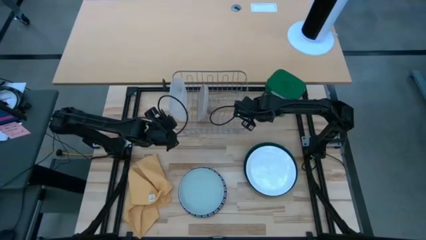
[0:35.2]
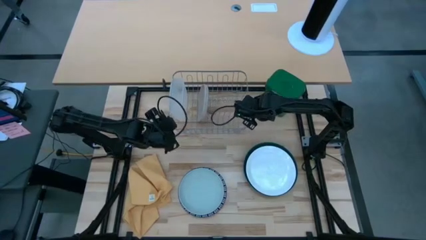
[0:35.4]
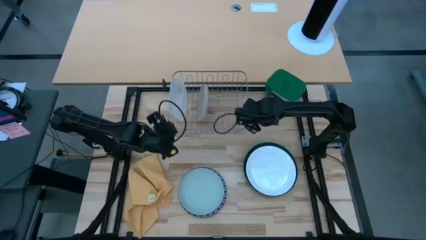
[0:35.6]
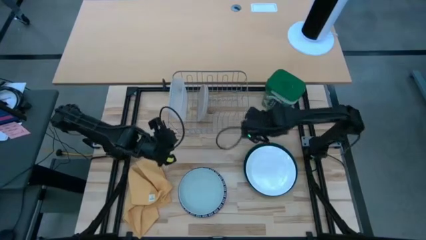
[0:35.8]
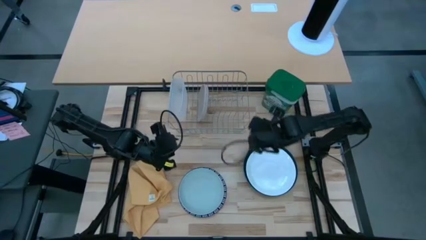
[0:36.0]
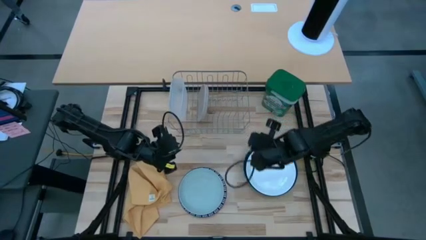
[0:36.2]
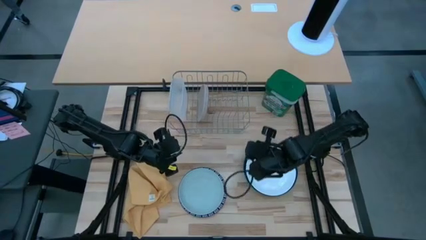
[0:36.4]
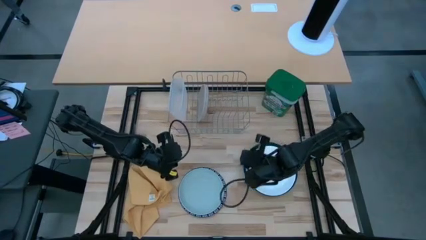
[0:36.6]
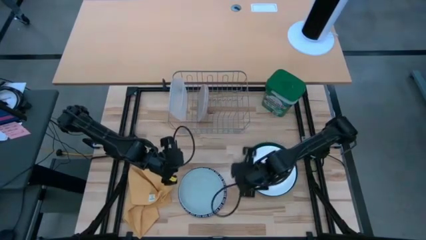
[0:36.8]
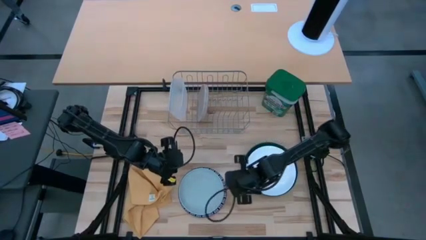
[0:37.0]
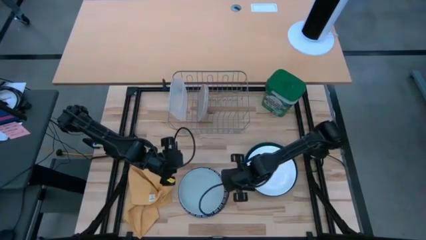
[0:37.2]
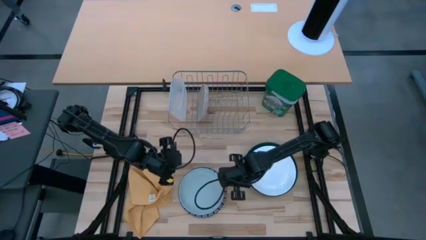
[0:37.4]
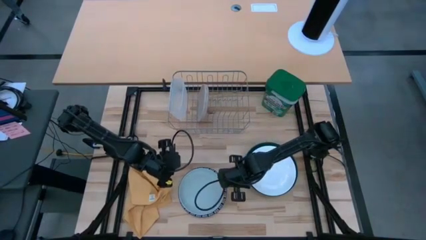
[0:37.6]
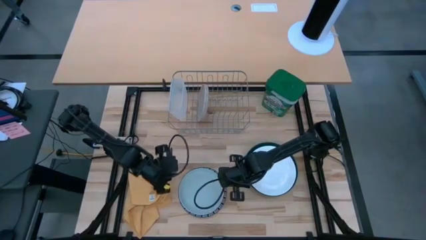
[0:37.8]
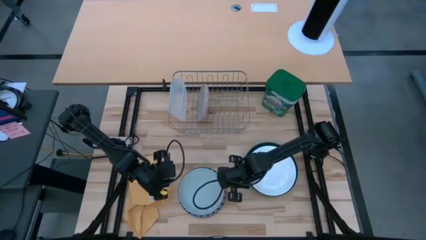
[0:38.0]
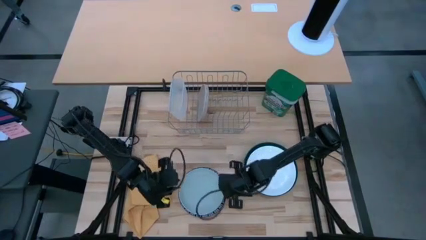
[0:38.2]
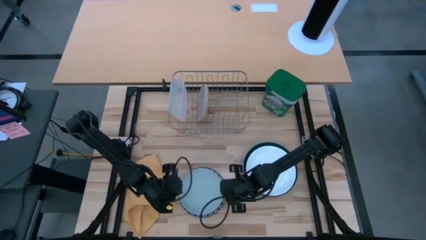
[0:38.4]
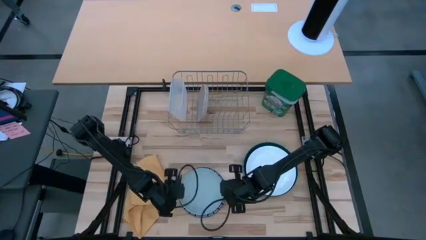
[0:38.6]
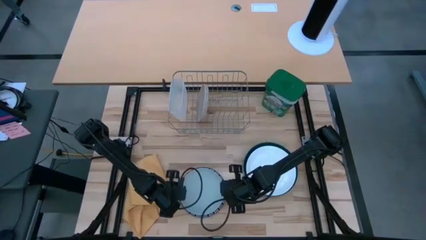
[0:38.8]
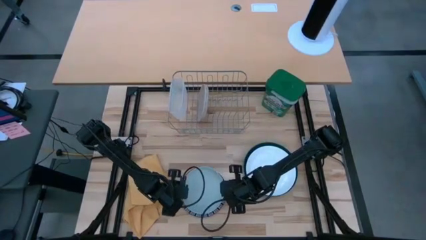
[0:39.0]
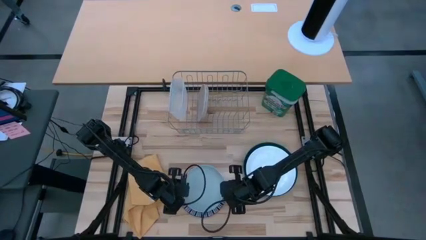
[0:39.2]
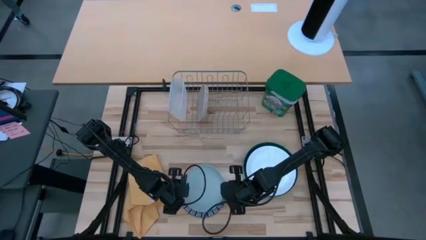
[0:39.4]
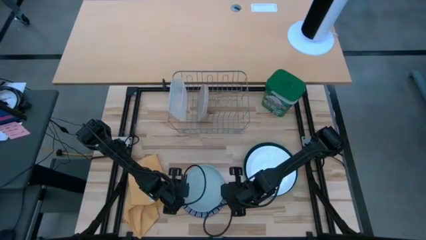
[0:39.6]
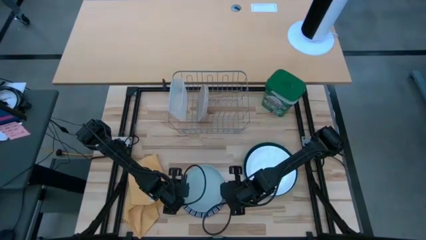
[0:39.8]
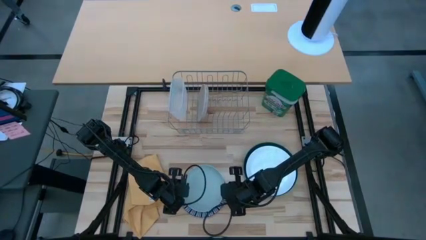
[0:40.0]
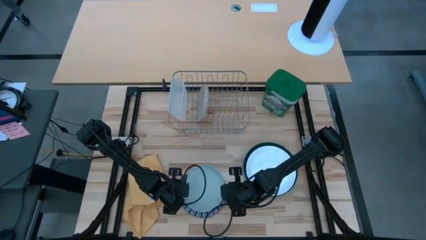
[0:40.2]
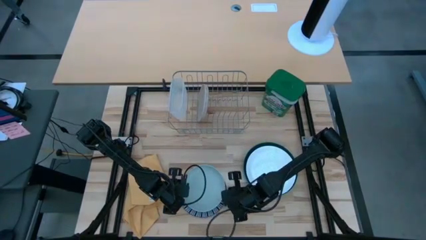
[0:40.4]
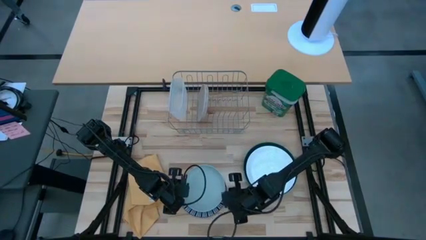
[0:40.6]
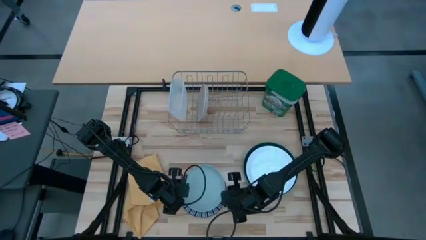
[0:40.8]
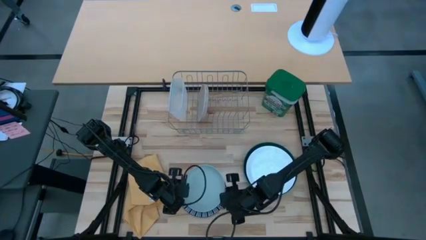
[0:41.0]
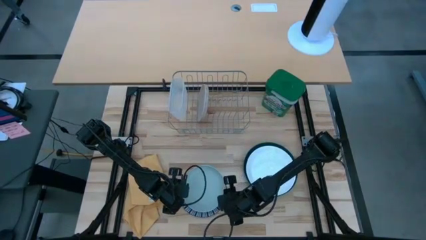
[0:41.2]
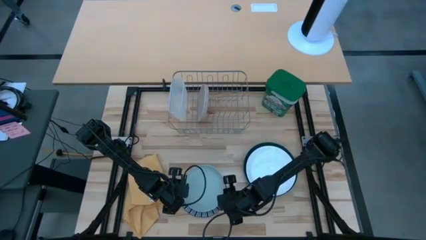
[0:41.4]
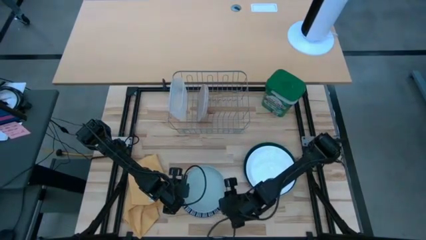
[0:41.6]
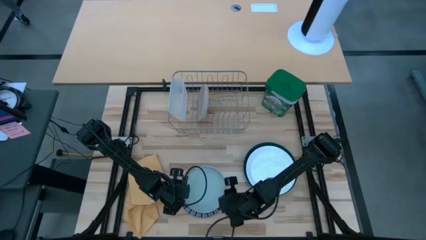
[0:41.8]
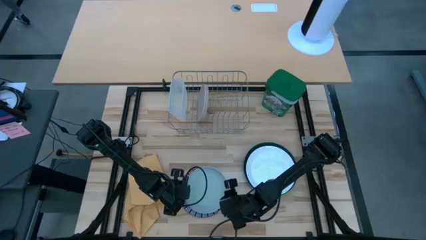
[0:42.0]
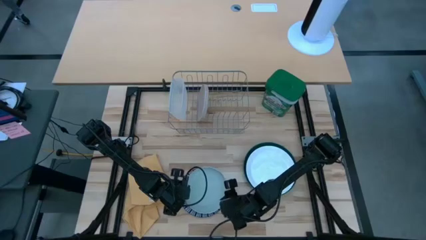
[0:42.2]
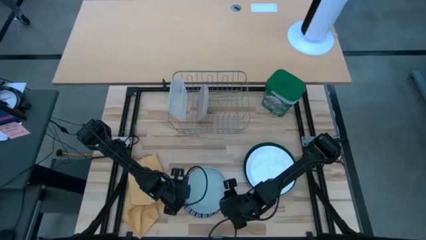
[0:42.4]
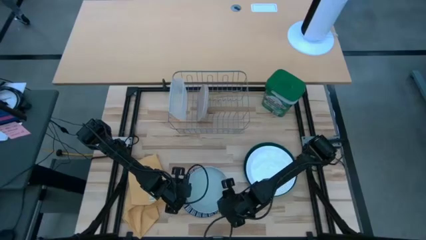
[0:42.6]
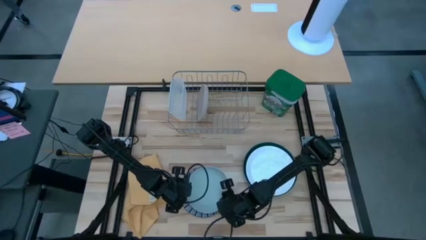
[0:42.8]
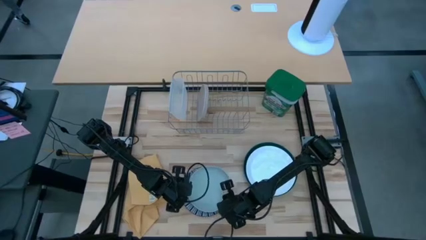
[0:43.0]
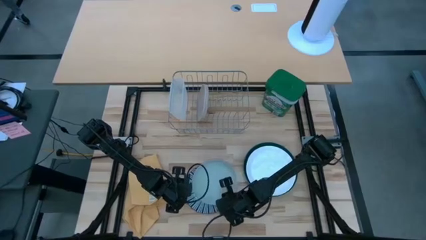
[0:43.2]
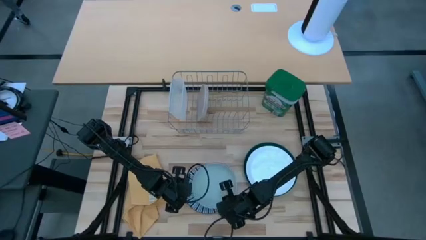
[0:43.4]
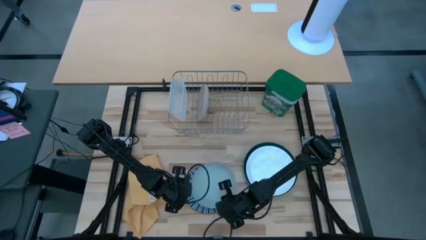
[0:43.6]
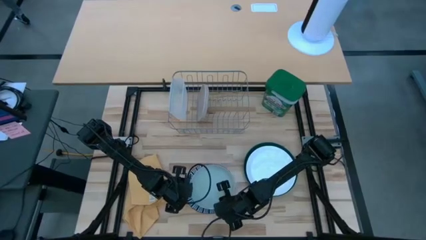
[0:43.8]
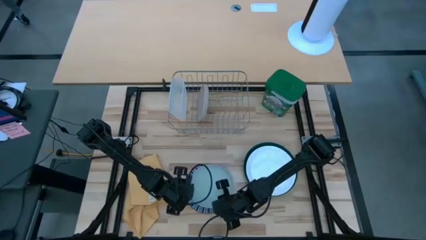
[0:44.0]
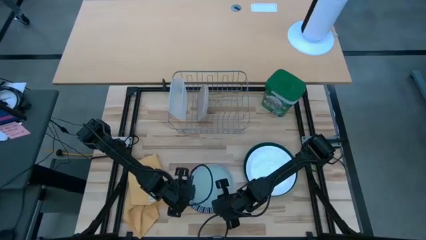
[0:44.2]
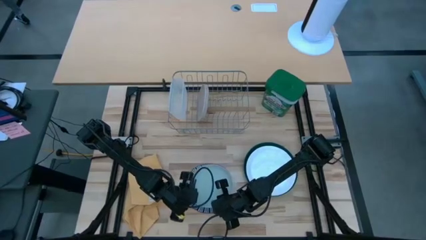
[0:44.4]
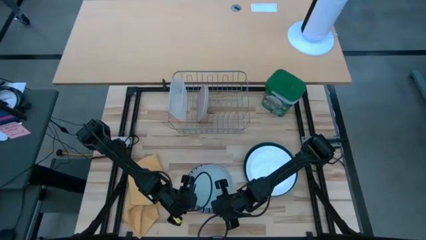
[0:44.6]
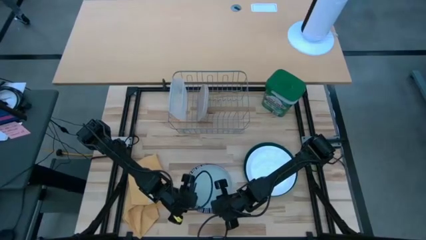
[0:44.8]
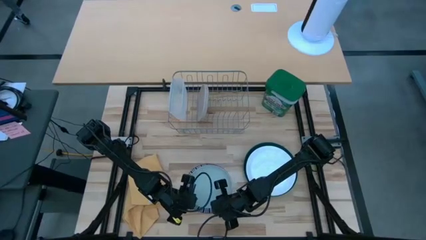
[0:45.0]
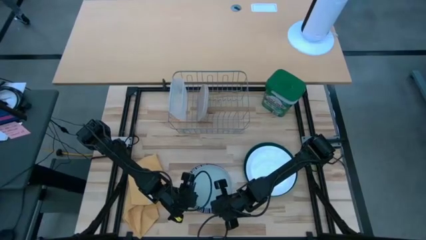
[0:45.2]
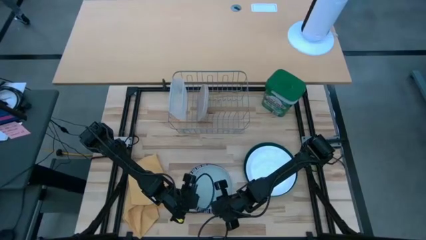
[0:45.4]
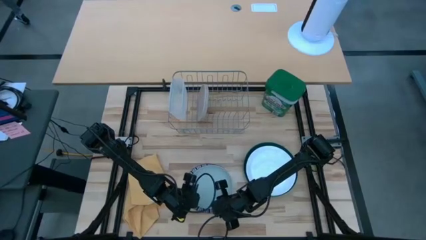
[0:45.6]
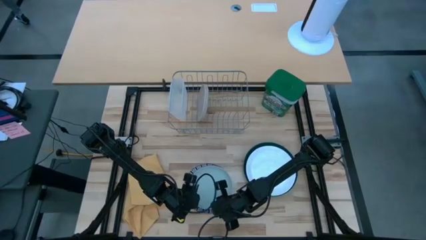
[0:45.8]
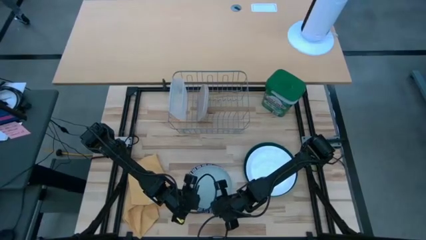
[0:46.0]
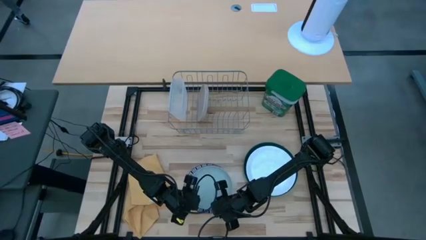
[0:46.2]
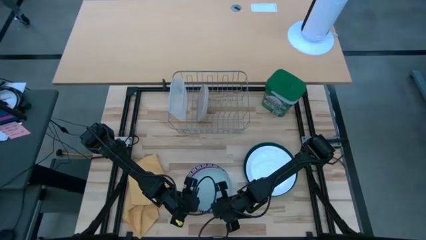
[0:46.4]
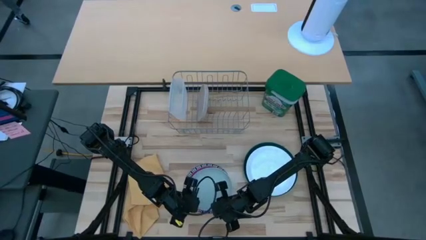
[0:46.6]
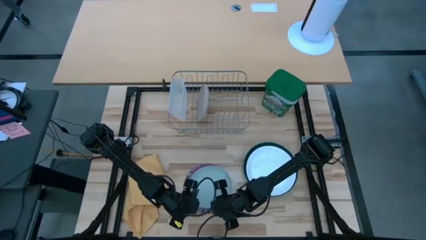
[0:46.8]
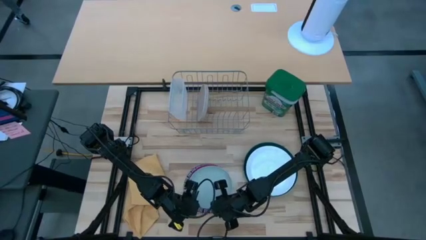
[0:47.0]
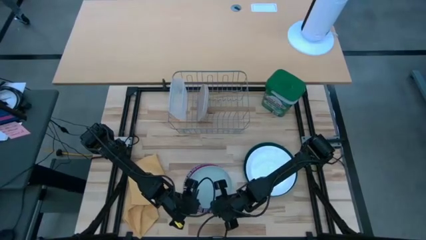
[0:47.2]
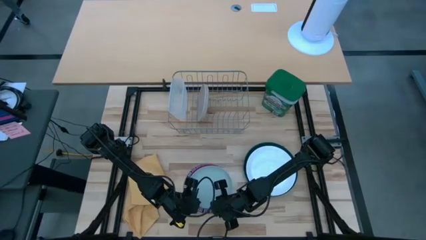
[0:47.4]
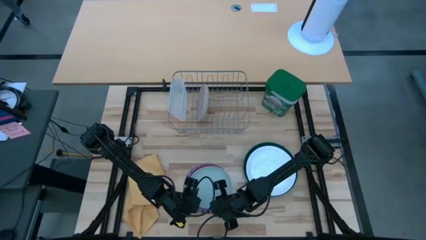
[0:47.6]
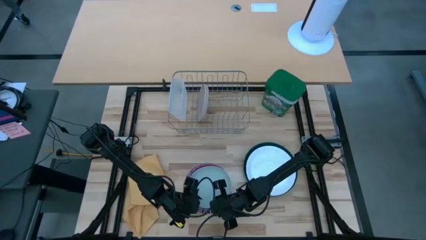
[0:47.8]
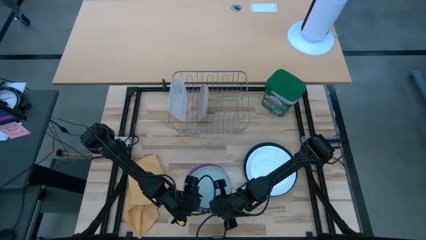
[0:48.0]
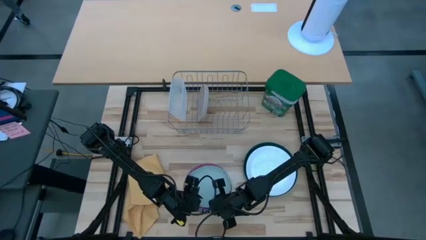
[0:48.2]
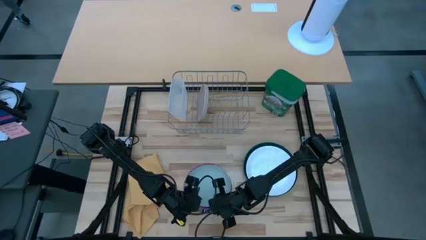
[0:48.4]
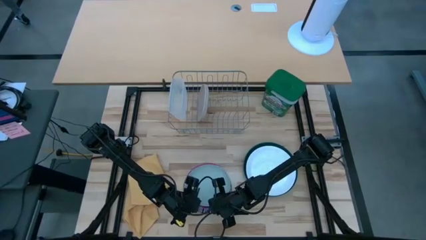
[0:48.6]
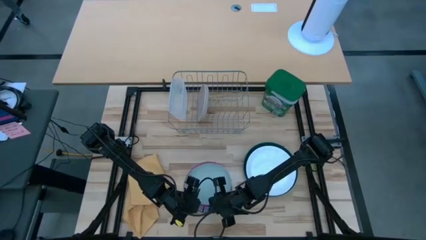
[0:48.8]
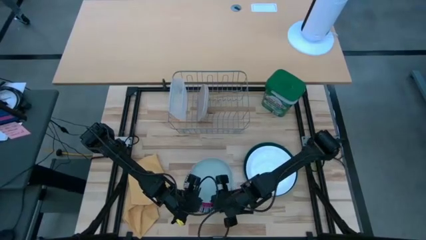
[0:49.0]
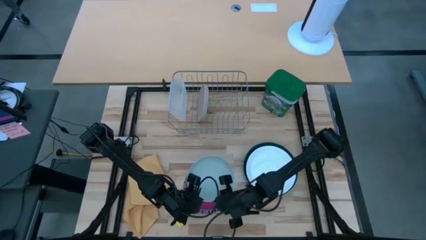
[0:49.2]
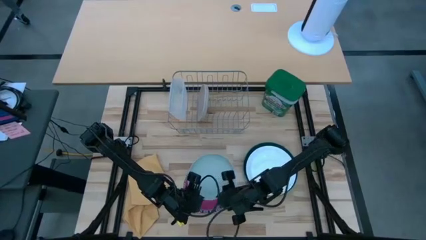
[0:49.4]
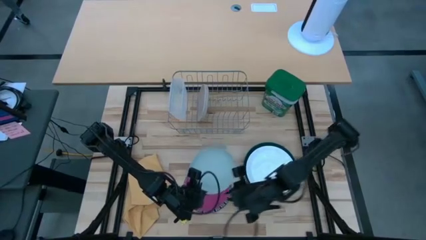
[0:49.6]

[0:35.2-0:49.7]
Task: Sort dishes
Put the light blue plate into the dish rack

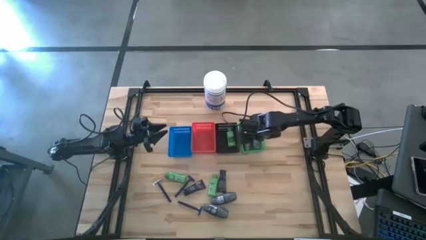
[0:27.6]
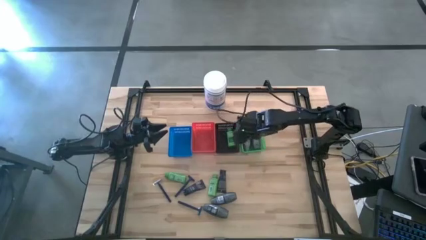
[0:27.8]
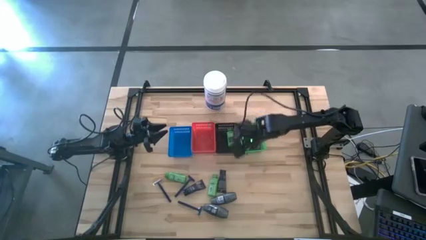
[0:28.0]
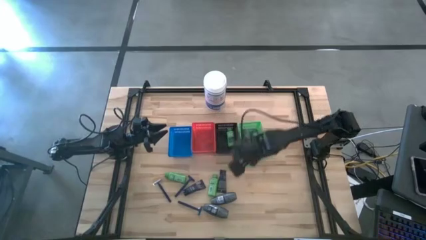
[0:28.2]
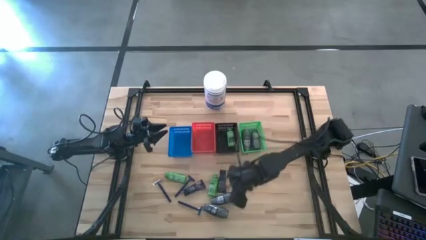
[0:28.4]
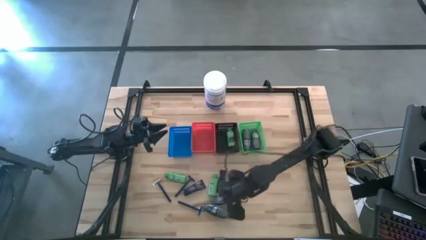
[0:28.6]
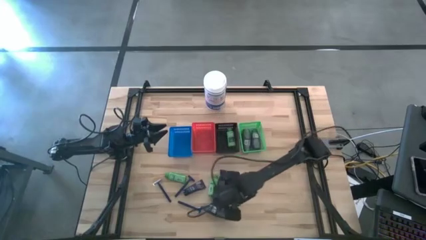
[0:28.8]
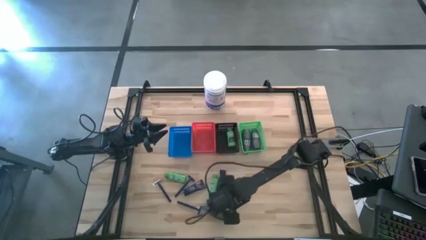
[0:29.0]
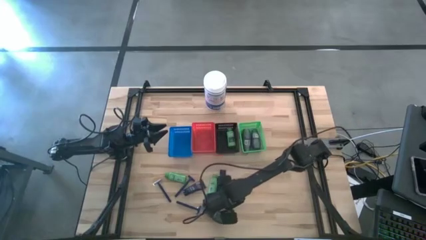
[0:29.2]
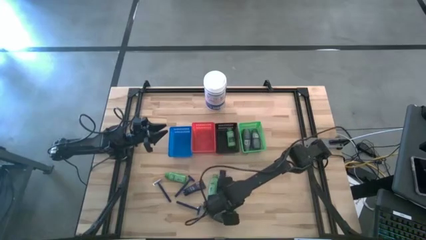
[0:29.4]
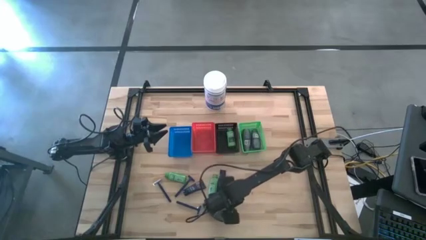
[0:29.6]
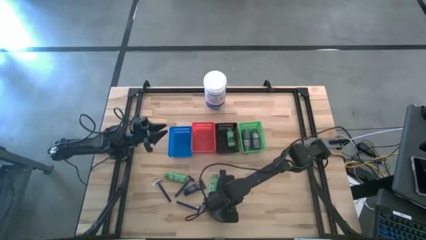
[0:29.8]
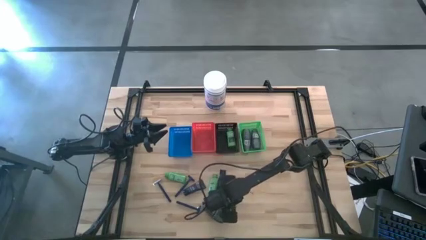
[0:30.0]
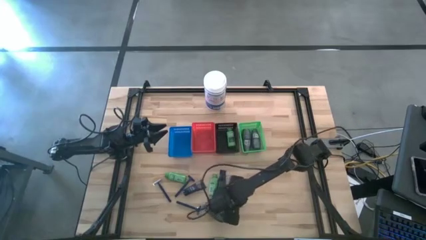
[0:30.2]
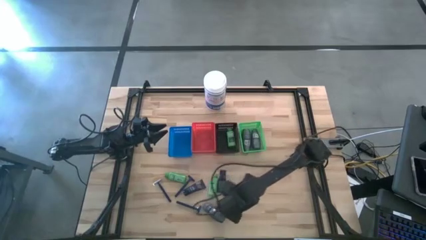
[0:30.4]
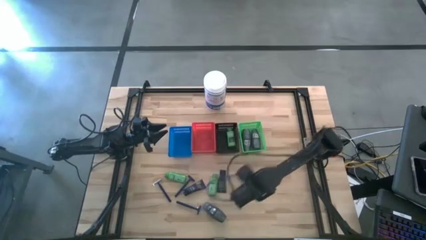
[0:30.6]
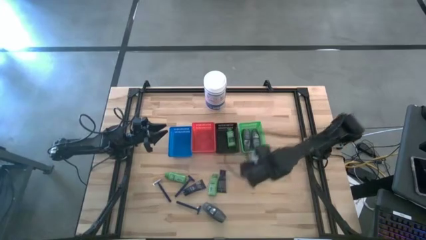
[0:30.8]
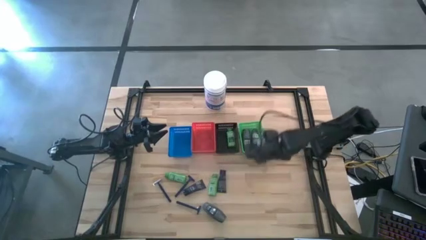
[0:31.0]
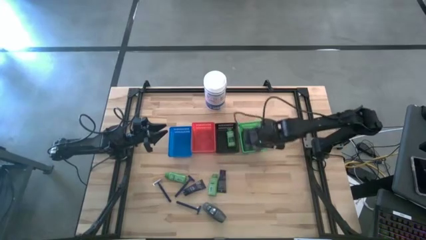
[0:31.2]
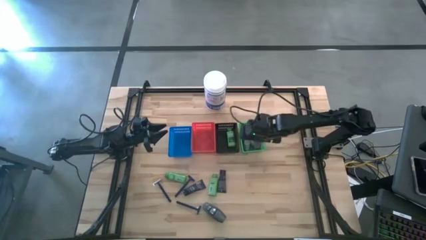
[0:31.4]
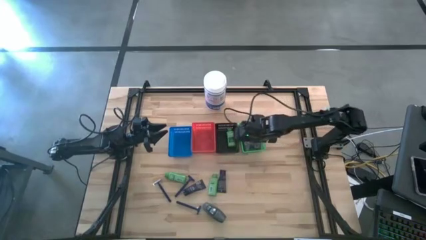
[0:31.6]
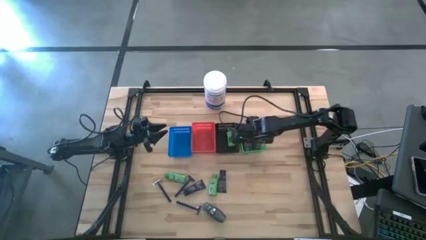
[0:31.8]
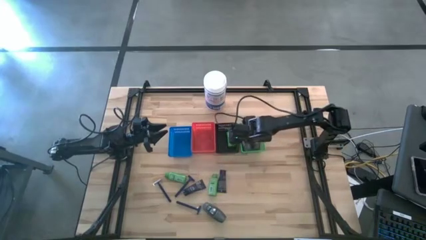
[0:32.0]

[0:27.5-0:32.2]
Task: Pick & Place Travel size toiletries
Put the black deodorant into the green basket
